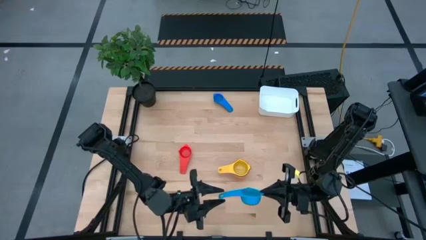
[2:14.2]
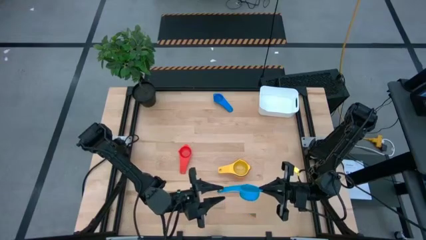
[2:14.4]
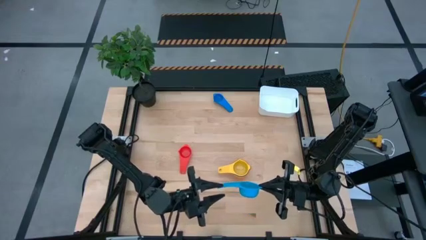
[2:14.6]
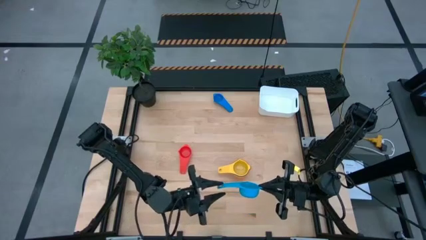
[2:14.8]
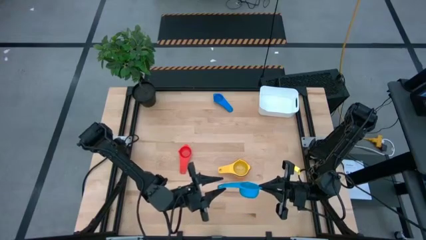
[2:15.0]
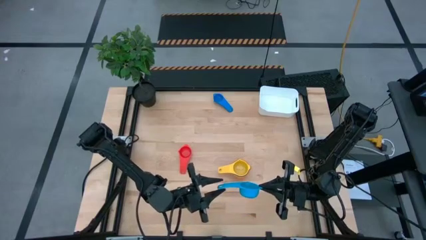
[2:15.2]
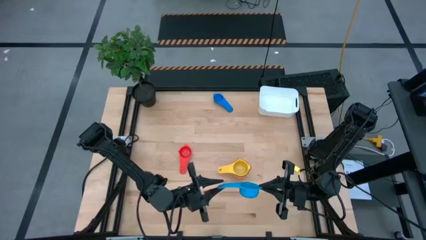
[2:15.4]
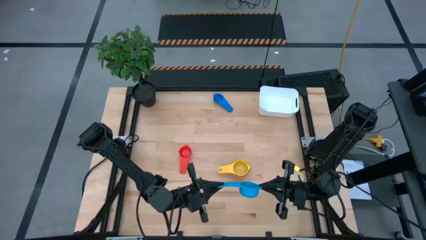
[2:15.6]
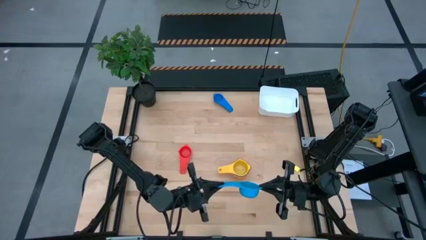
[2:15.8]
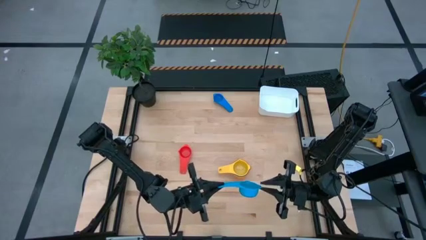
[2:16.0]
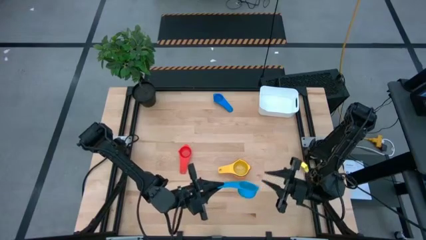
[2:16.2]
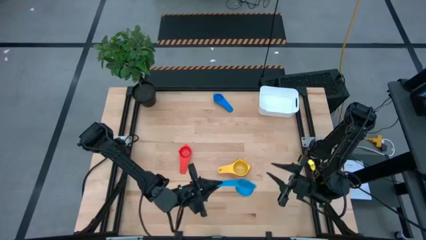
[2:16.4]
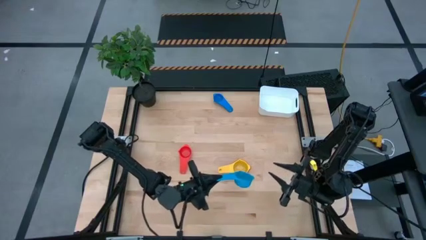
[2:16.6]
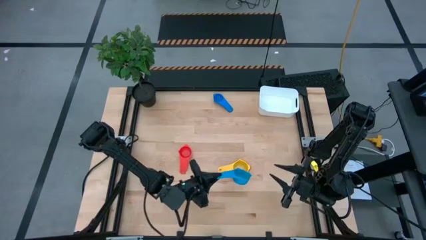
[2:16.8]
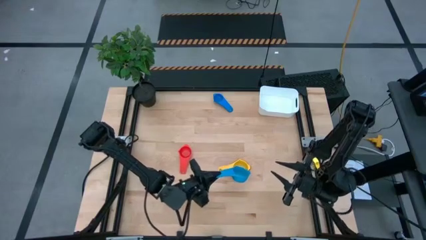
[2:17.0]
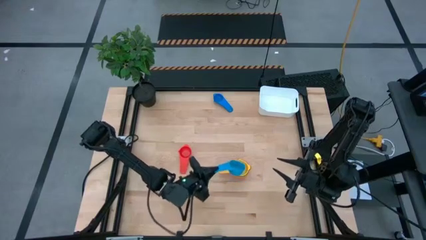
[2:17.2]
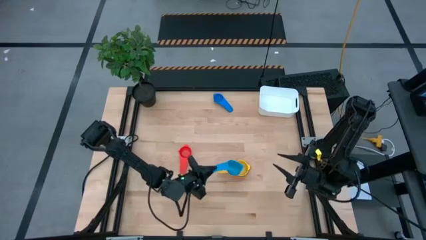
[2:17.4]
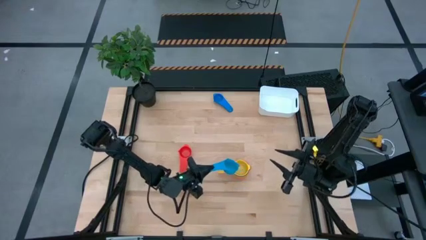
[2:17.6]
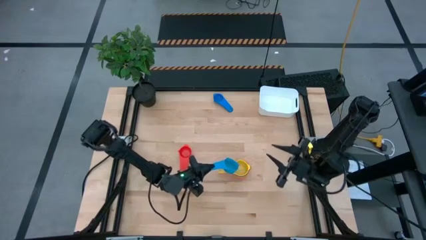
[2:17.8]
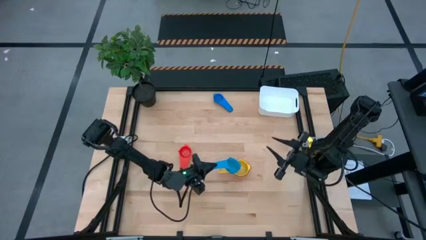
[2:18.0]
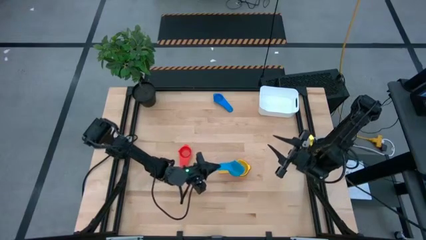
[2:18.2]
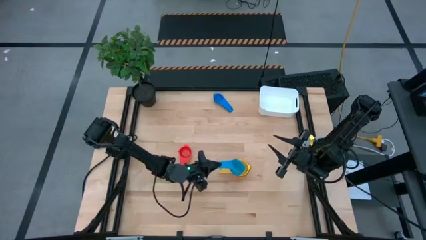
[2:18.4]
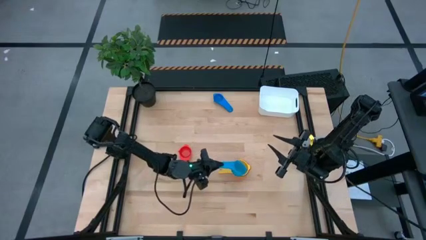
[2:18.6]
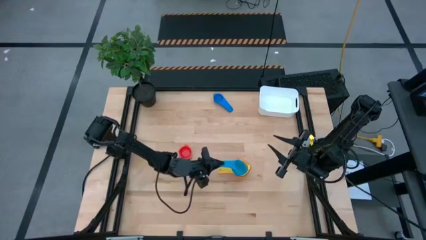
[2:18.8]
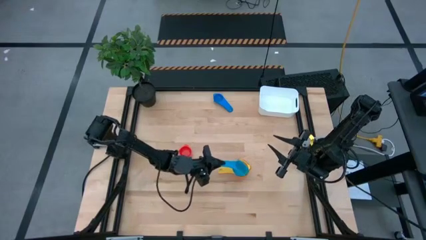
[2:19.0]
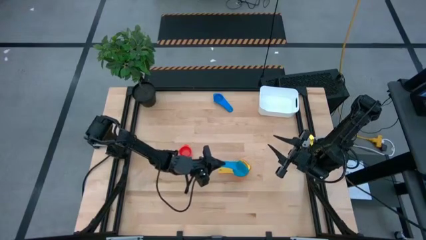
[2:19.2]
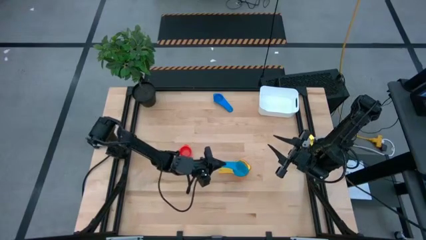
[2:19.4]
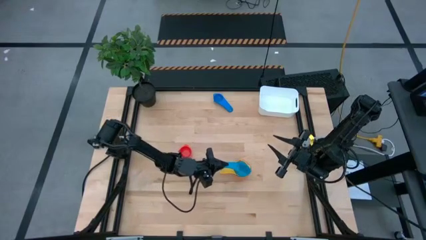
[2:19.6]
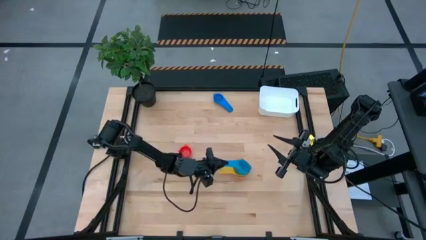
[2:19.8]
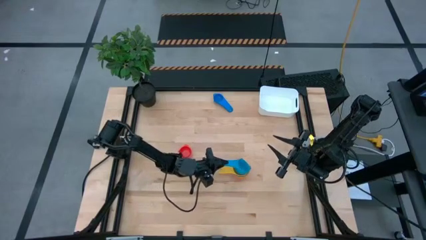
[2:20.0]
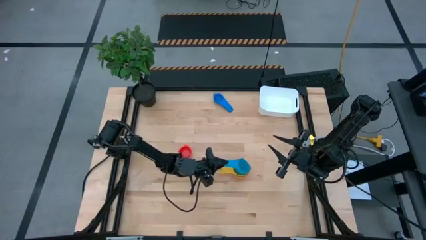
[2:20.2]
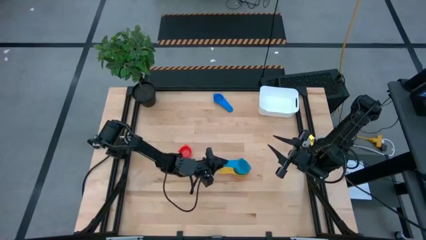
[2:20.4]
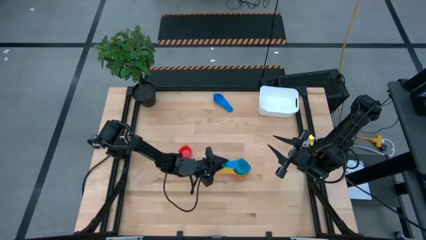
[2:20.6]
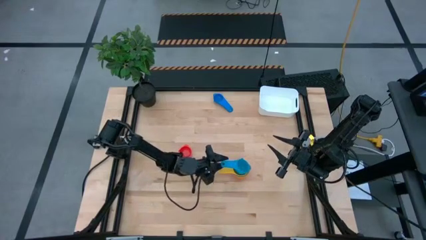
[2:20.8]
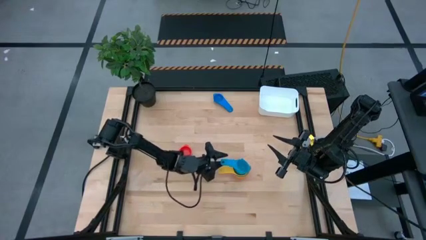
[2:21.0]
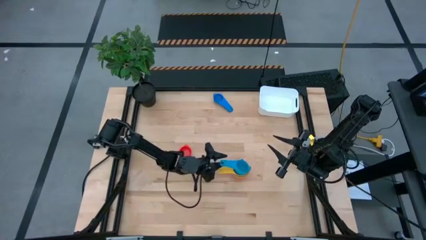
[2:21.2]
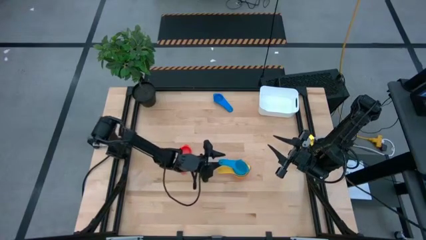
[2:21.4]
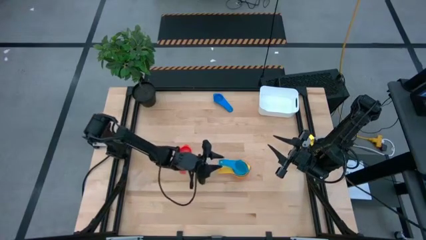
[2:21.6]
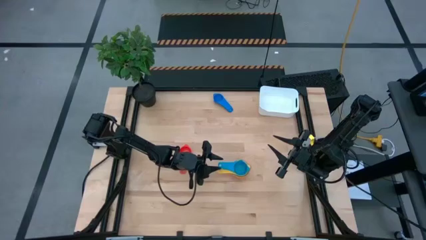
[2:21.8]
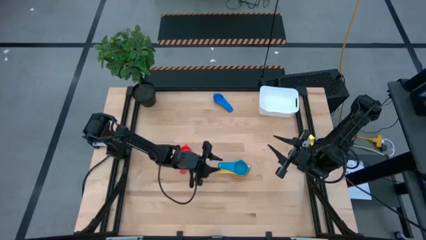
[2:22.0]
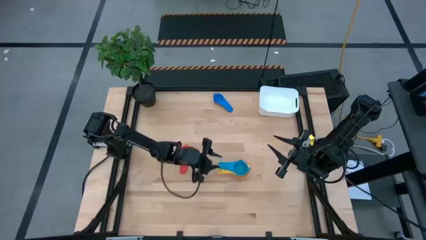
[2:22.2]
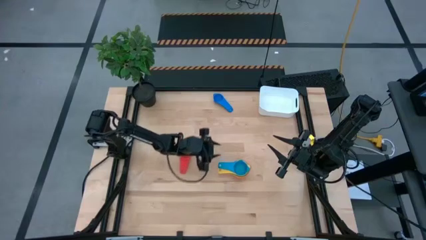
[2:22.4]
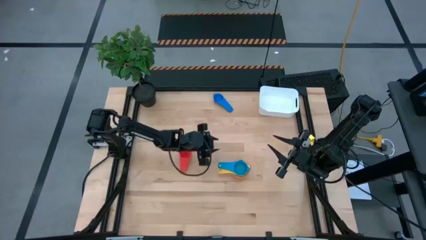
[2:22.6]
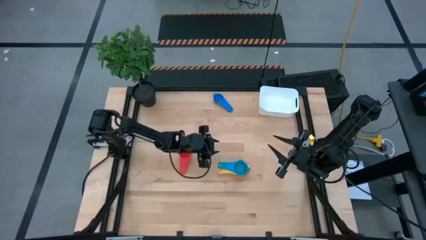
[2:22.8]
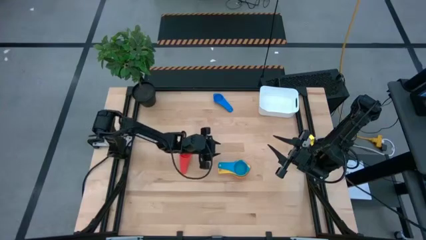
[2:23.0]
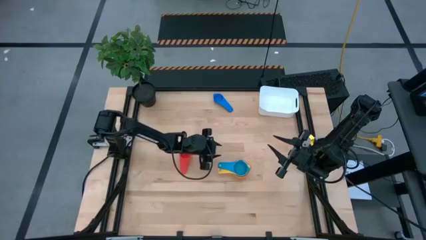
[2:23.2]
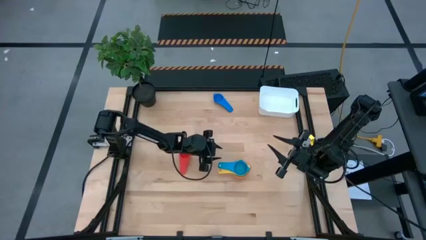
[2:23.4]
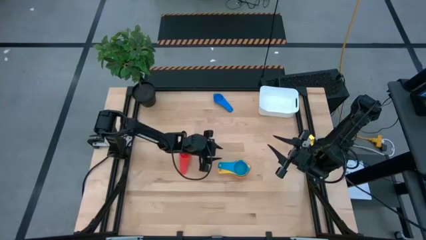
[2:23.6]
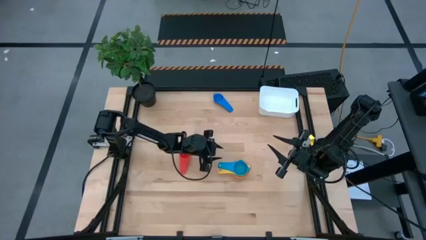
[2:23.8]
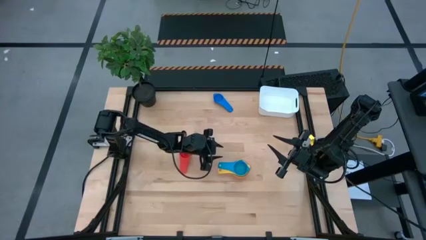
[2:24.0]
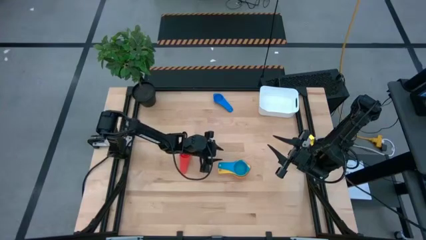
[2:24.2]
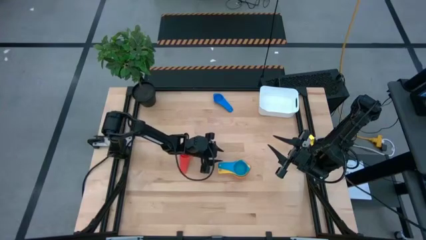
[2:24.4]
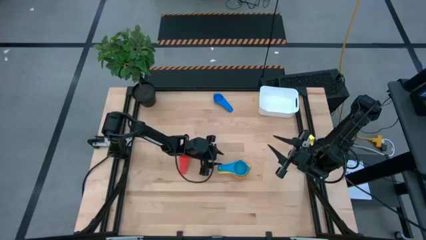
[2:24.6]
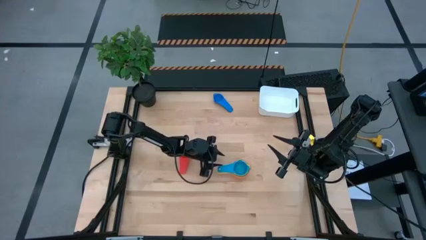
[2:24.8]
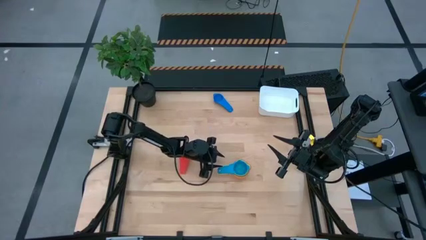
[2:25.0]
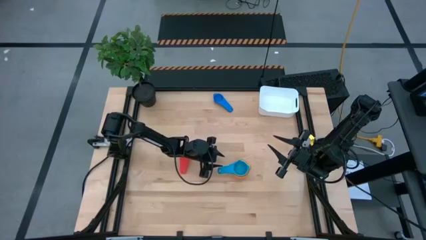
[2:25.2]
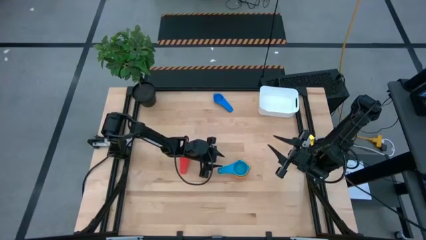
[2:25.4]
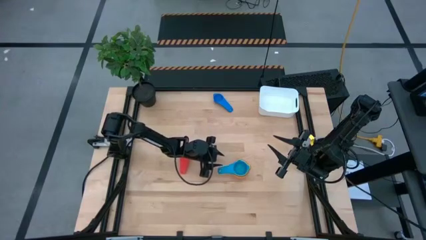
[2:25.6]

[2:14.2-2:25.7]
Task: Nest measuring cups in basket
Stack the light blue measuring on top of the yellow measuring cup

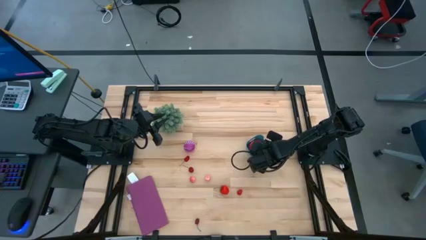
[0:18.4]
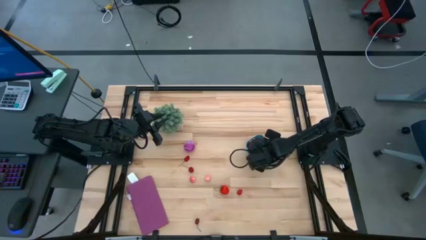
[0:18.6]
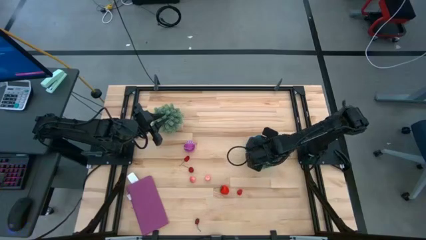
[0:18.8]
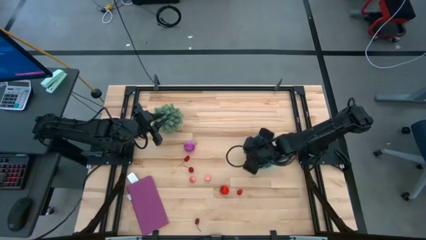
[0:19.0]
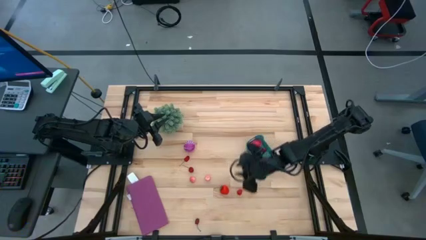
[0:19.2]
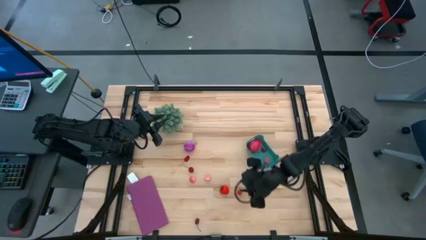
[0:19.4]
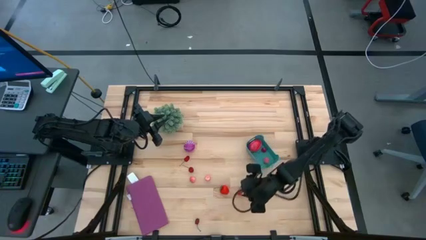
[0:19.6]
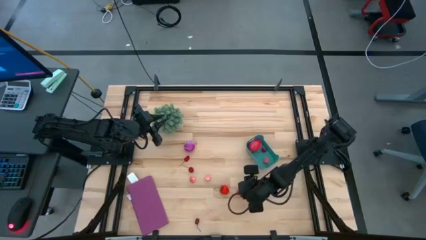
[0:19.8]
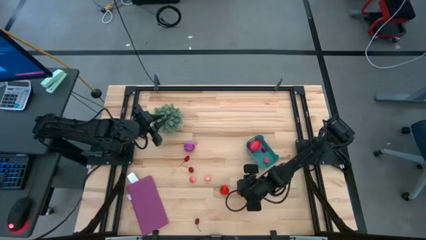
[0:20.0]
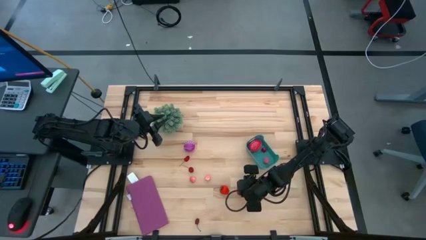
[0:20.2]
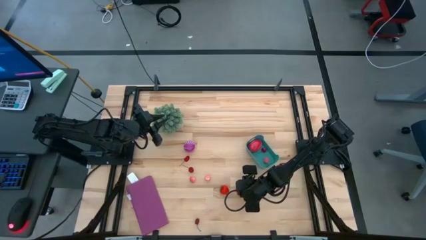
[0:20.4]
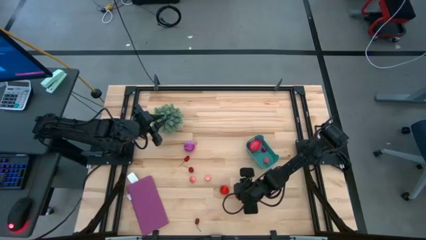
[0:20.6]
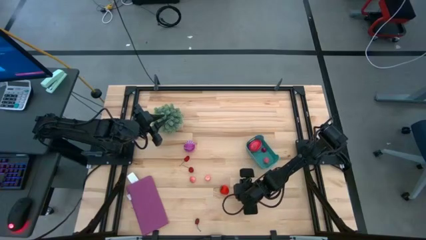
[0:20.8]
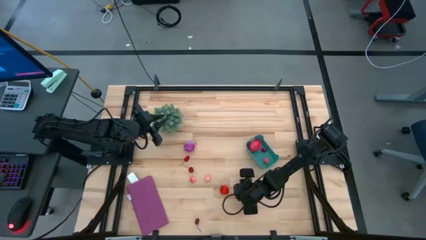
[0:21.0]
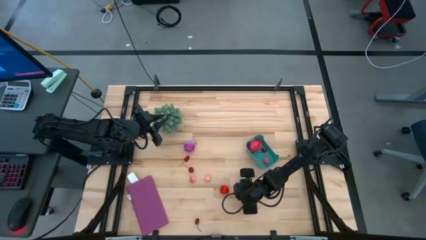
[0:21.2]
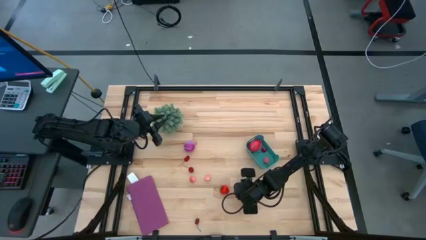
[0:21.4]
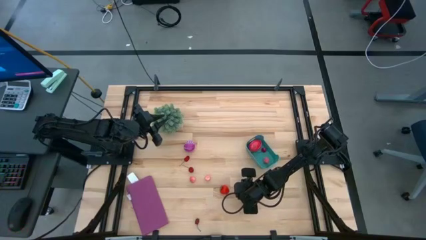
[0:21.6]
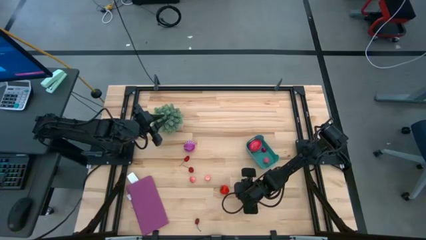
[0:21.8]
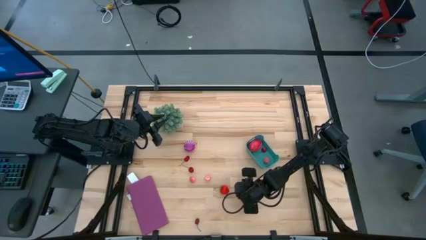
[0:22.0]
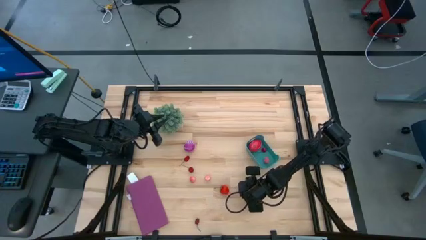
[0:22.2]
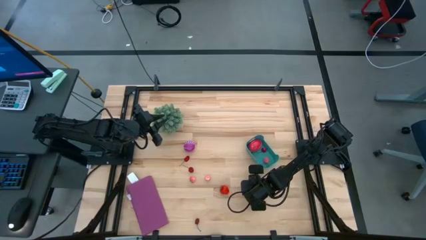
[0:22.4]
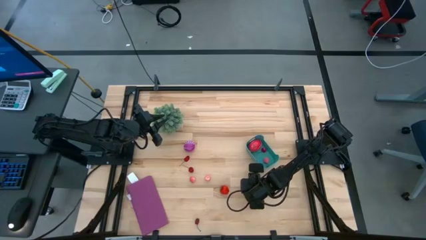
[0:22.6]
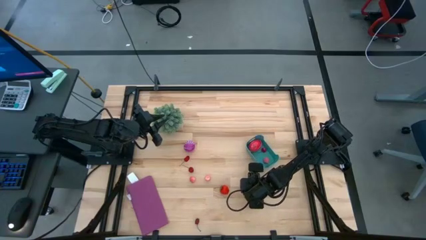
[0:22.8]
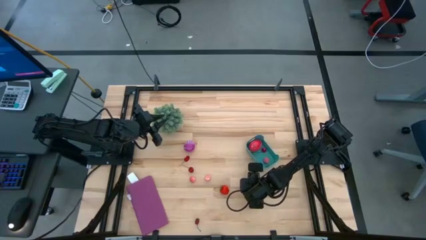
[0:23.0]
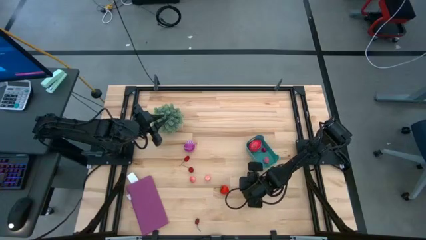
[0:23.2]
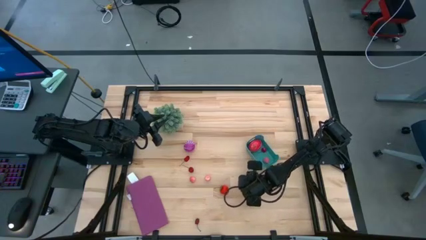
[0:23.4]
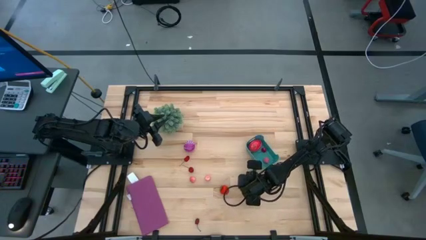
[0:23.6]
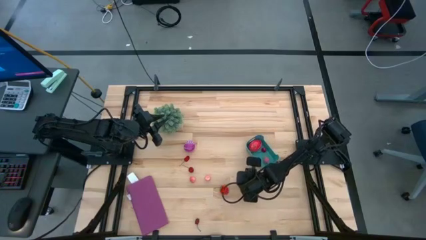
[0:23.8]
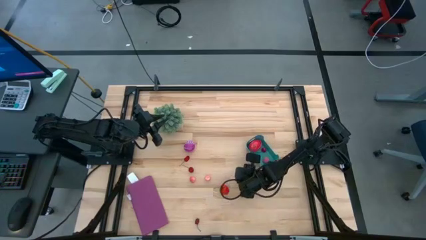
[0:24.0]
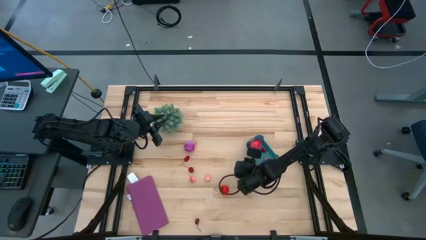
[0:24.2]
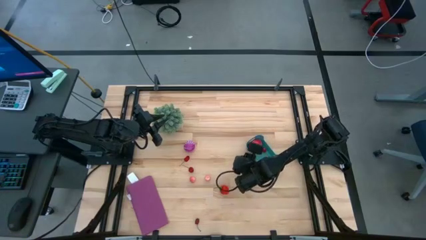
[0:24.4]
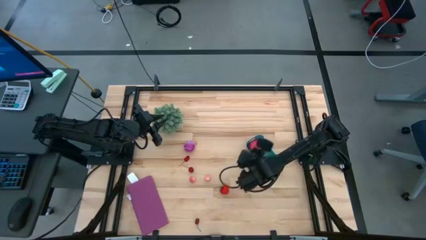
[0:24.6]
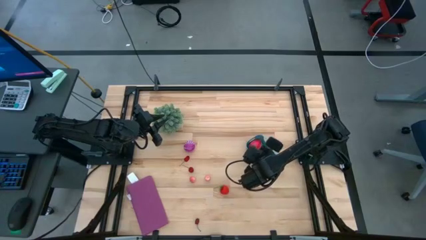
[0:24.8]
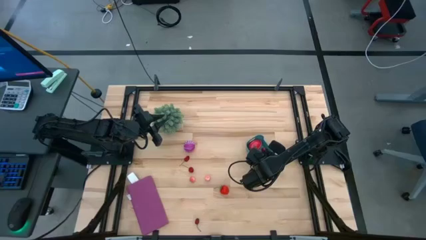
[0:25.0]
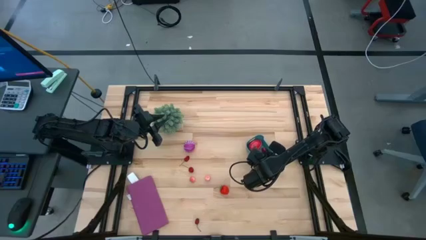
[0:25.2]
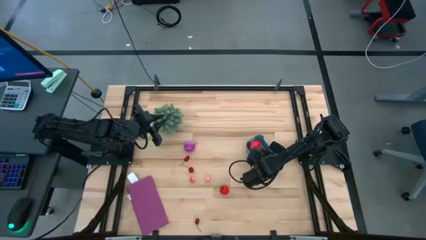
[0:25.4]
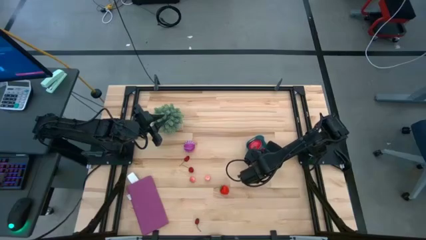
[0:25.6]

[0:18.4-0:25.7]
Task: Pick and placing Produce into tupperware
Put the raspberry in the basket
